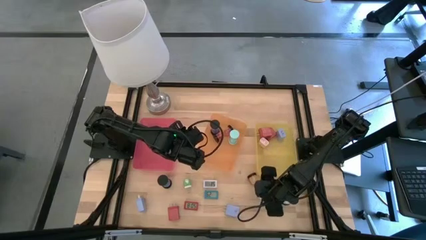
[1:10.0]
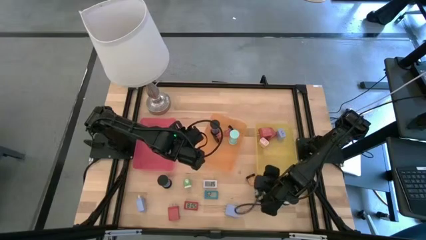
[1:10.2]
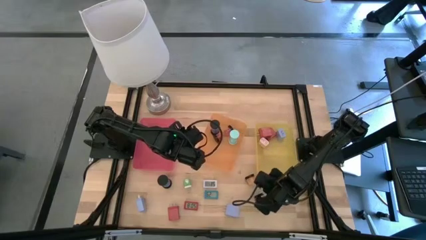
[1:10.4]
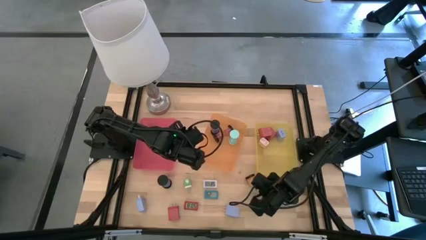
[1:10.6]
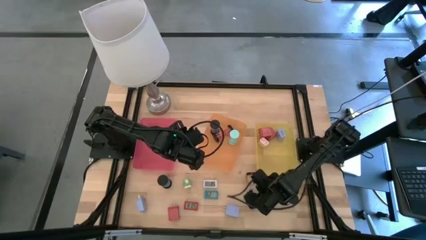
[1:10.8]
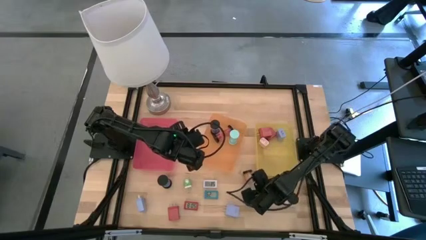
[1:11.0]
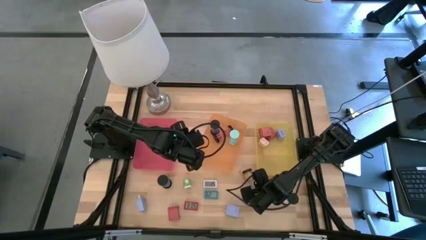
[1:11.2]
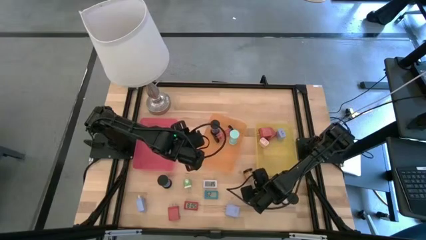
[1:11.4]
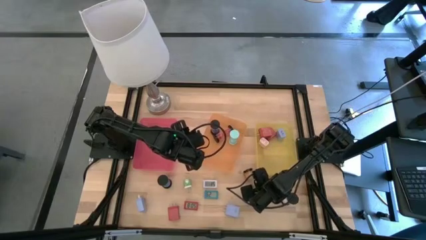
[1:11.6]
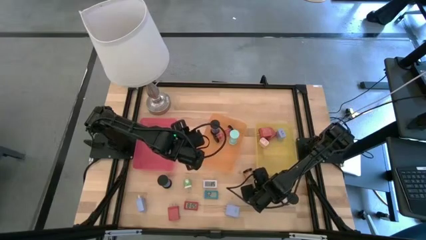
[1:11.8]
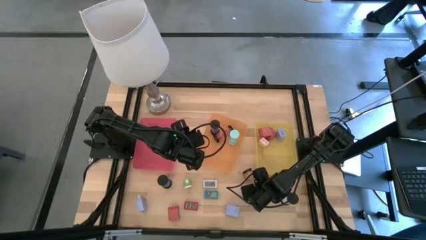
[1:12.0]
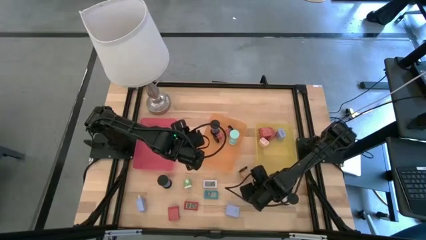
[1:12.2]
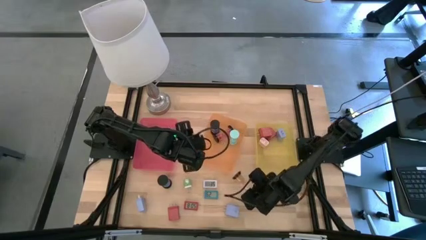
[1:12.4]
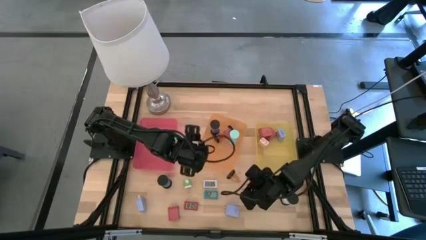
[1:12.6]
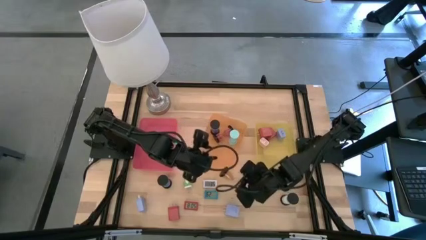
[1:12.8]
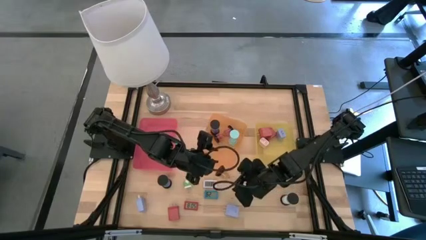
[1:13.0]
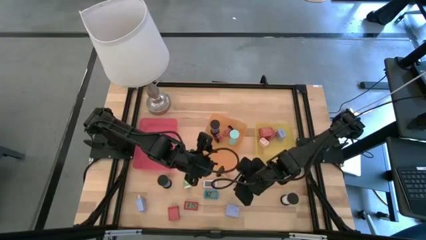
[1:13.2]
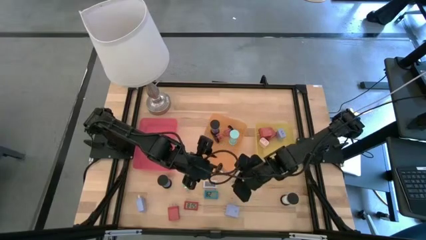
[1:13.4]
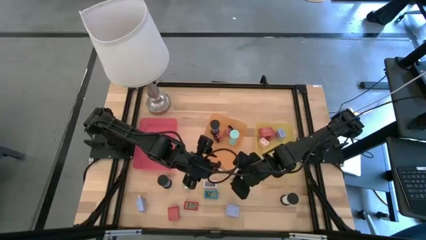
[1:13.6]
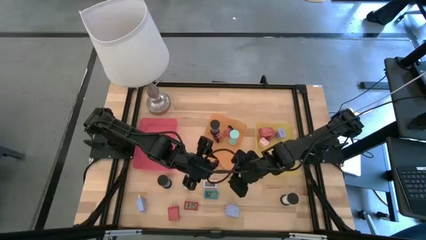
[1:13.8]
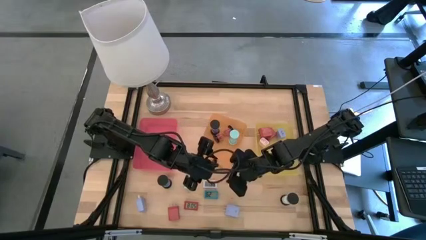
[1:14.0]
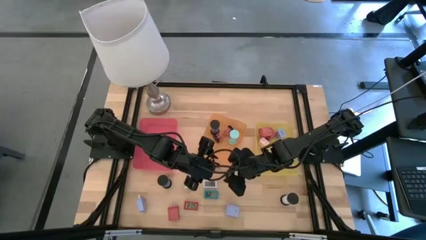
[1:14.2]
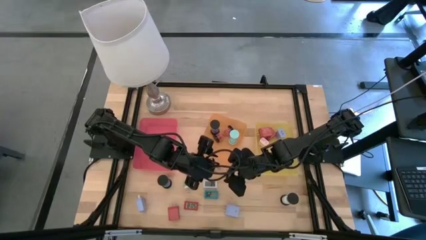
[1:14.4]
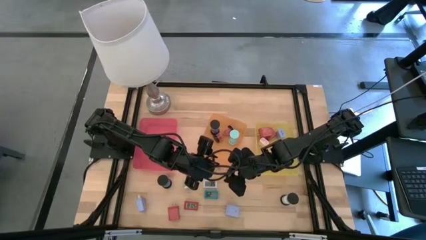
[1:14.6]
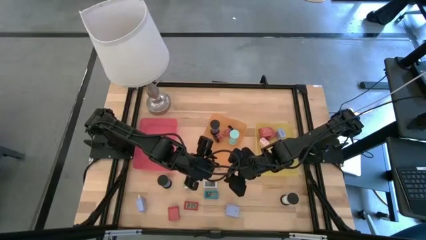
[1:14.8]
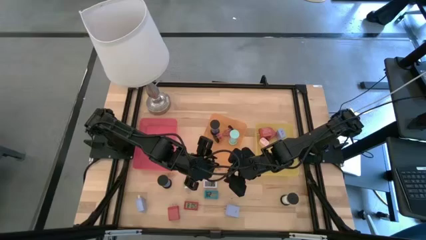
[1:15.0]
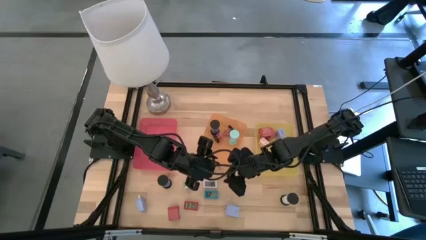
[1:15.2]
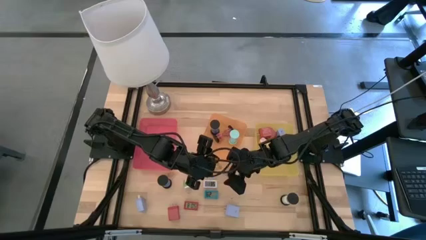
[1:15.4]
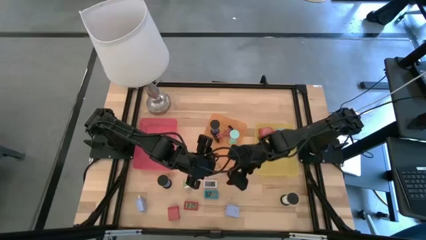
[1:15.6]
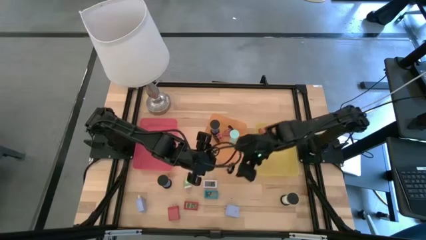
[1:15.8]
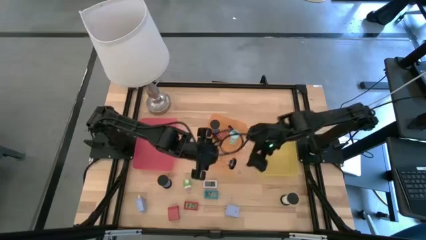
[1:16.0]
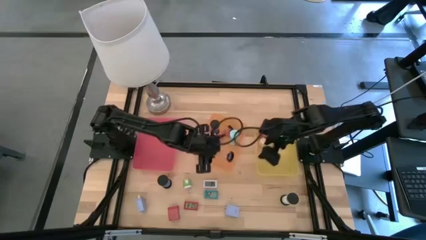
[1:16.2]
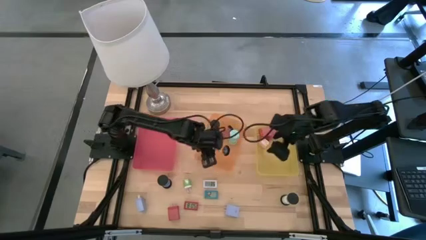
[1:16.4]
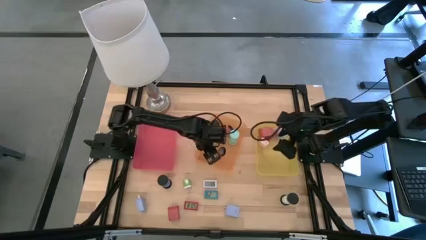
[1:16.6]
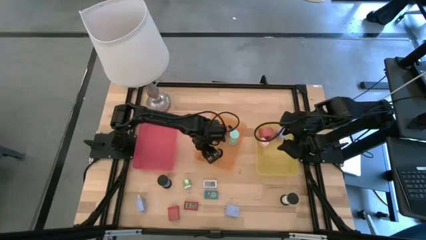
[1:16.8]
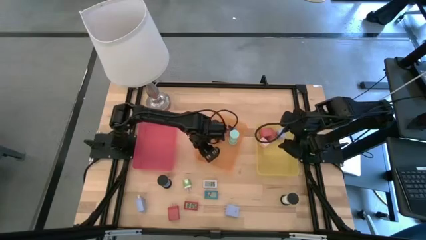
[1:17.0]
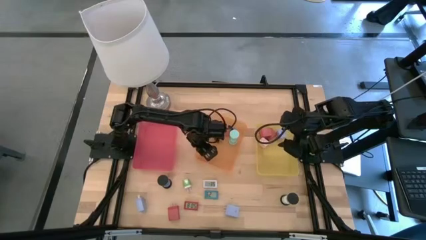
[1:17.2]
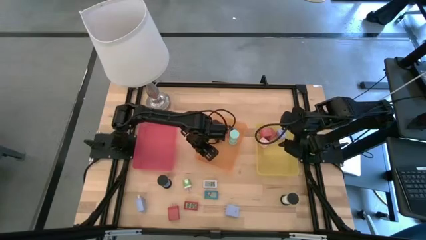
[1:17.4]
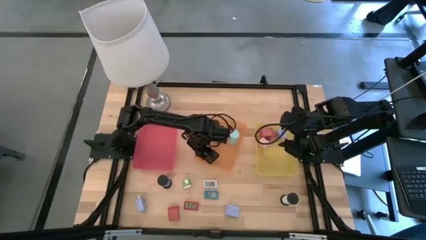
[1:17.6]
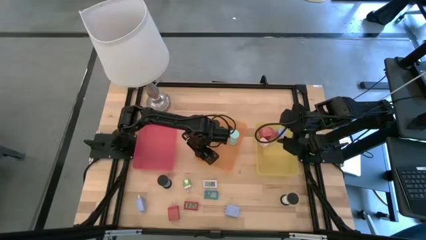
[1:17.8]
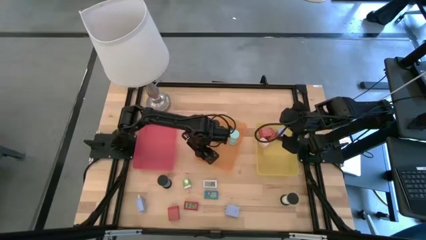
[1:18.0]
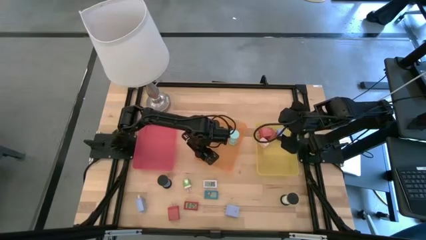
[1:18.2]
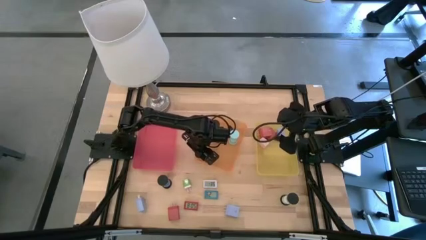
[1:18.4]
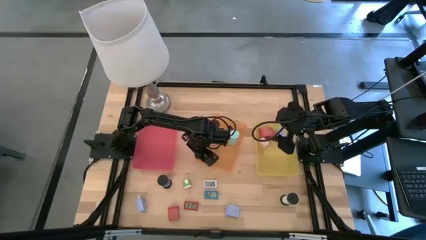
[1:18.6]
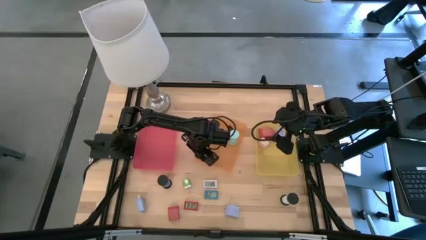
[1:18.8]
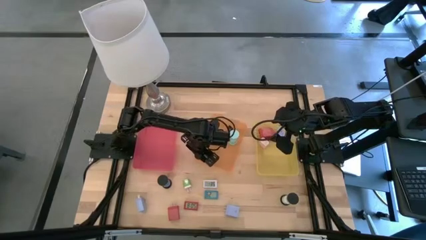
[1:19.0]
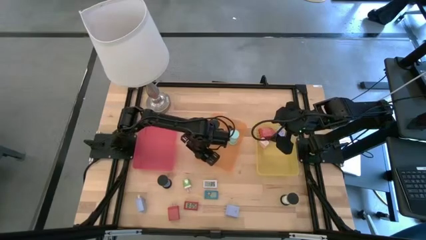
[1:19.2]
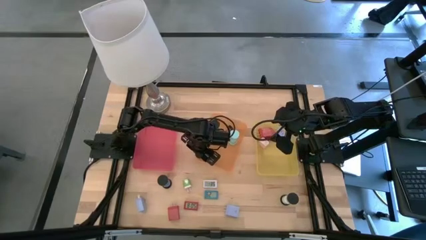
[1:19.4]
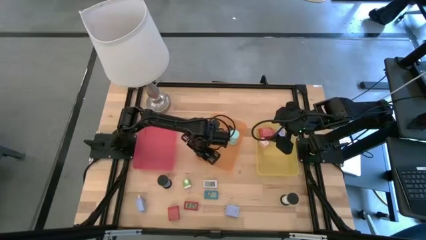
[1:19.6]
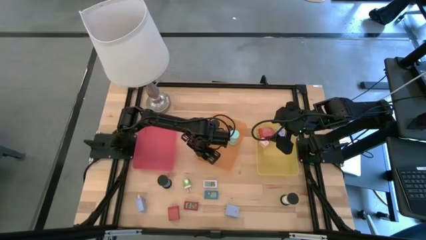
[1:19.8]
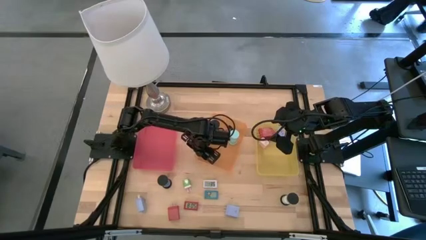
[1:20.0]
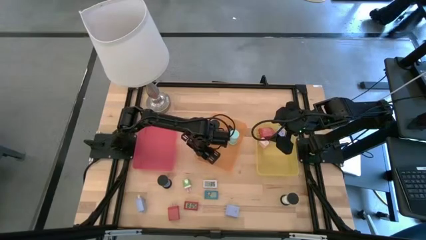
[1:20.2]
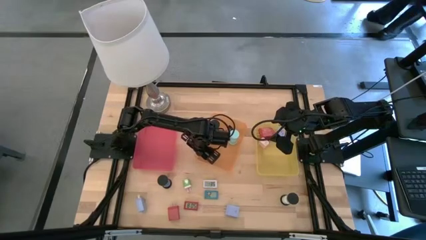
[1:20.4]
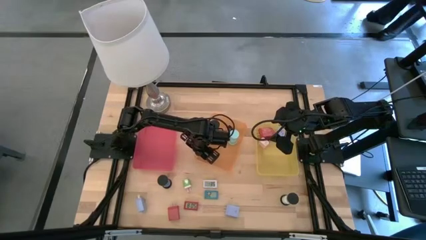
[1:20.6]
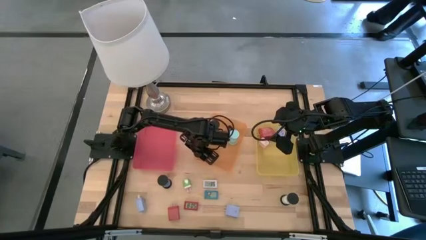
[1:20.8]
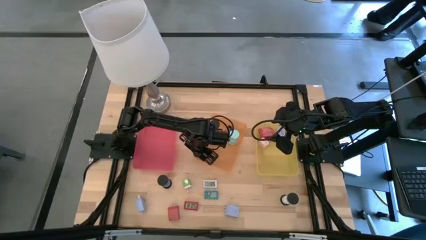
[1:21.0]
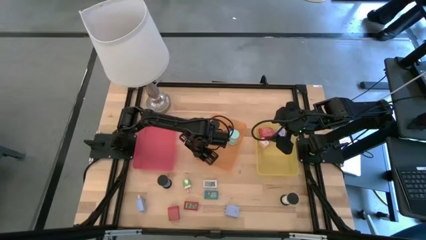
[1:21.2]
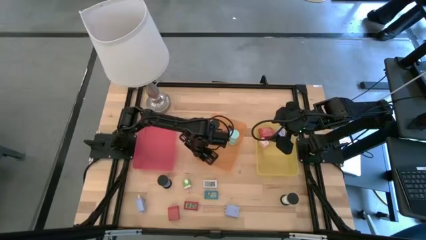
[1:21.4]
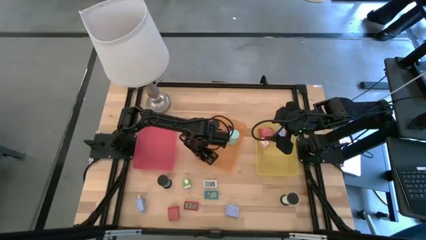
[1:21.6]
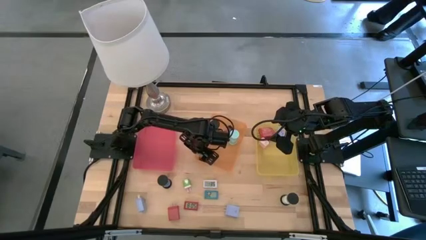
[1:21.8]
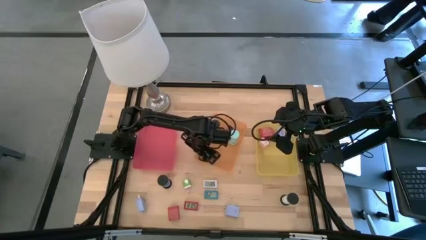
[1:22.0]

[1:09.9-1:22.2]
Task: Pick & Place Office items
Put the orange hourglass into the orange bin
